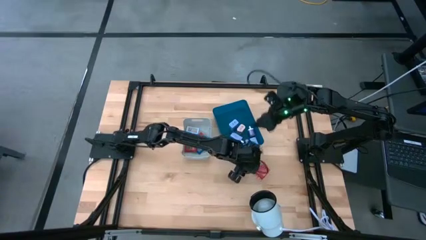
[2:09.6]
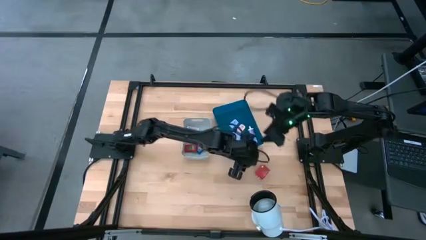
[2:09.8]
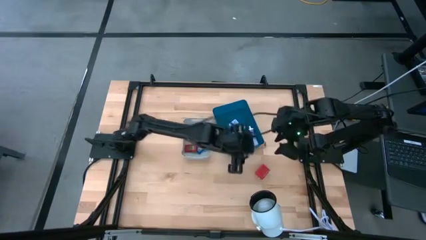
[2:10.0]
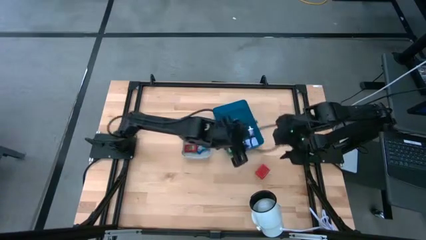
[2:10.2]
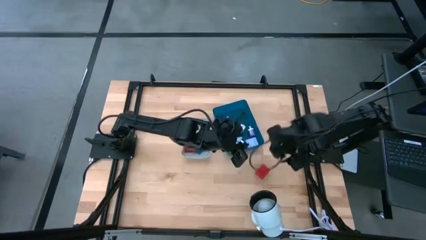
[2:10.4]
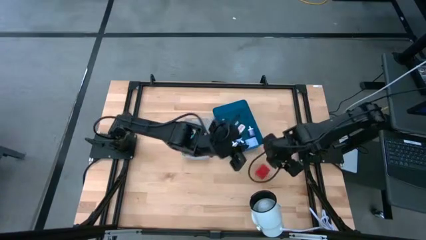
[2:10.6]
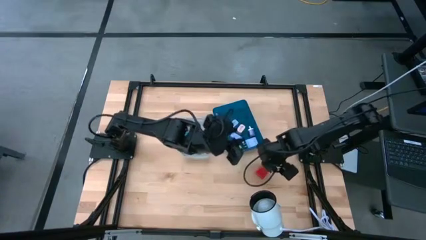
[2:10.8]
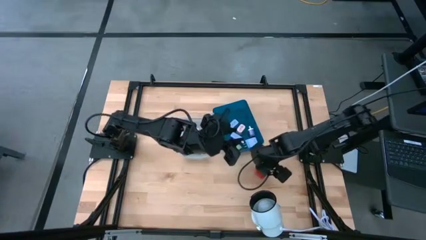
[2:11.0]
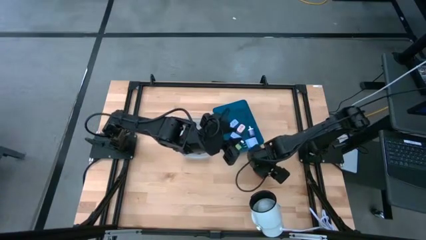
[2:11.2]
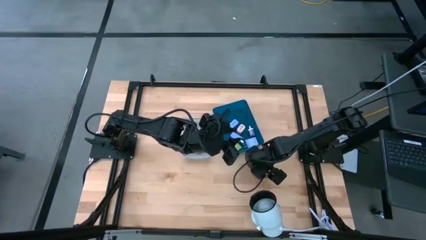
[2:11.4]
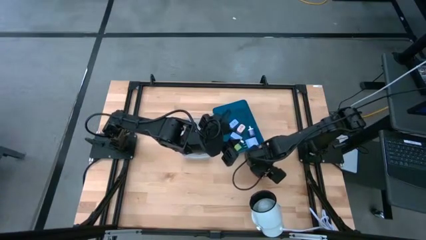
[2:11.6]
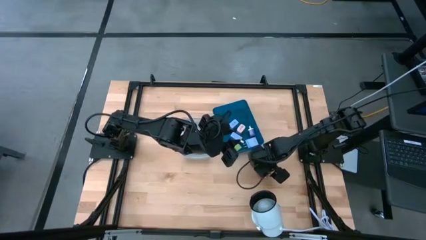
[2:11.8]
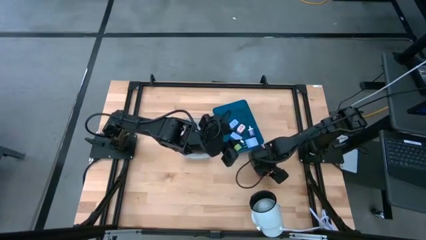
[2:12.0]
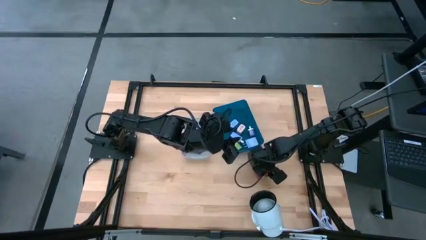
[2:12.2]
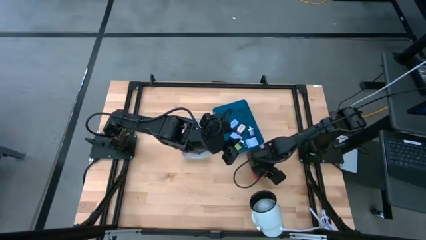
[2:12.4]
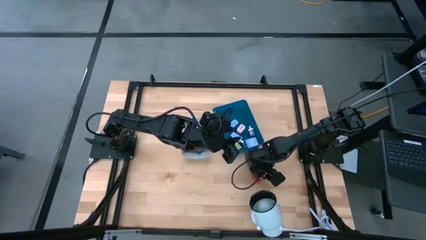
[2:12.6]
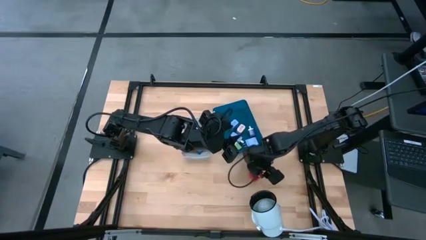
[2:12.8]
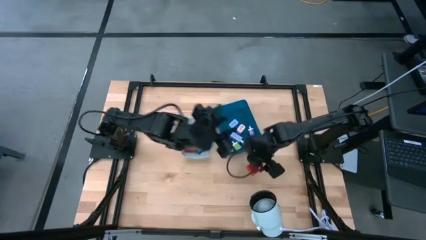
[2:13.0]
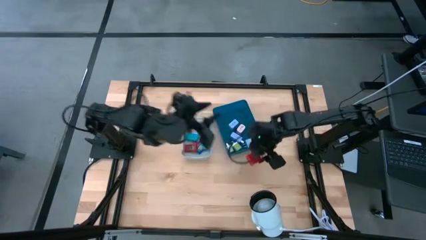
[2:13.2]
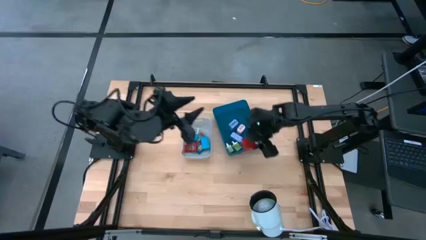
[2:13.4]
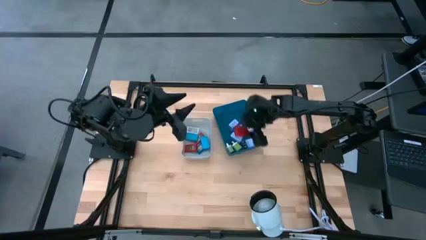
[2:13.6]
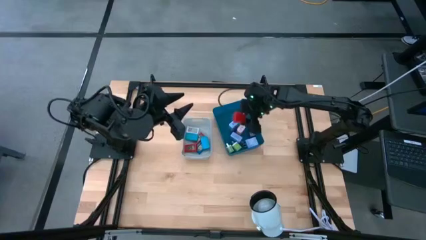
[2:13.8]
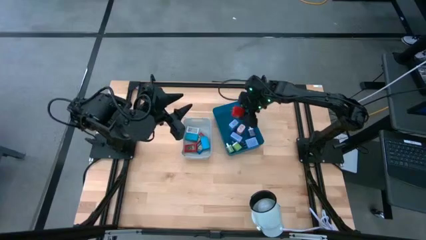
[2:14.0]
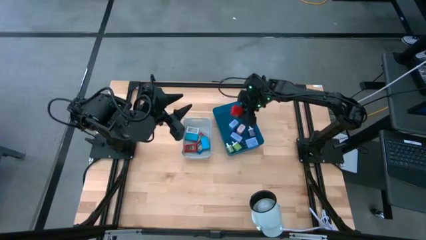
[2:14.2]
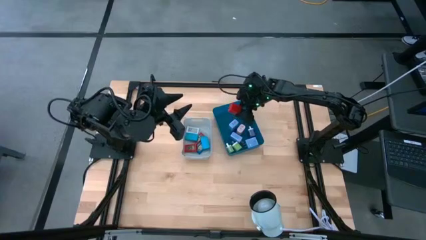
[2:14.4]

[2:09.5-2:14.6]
Task: Pick & Place Office items
Put the red charger adapter into the blue bin

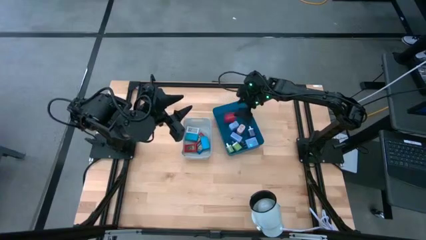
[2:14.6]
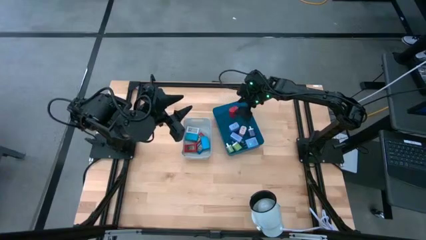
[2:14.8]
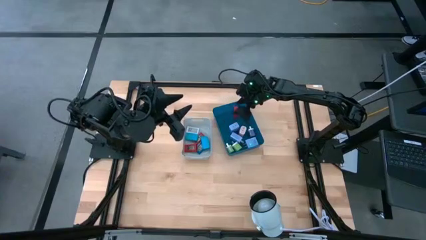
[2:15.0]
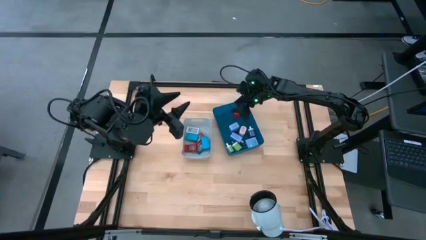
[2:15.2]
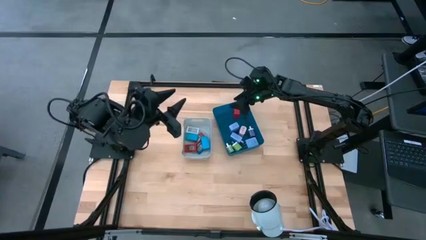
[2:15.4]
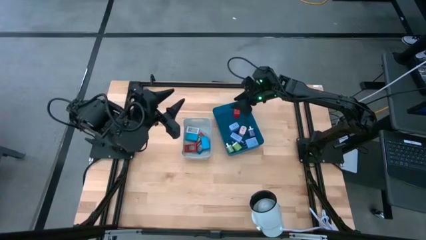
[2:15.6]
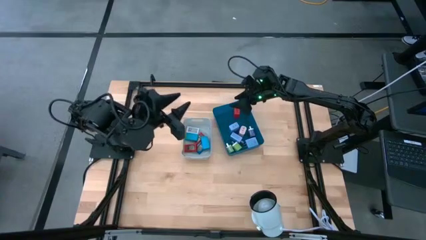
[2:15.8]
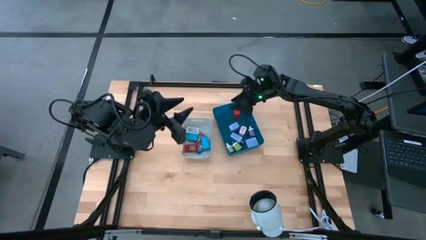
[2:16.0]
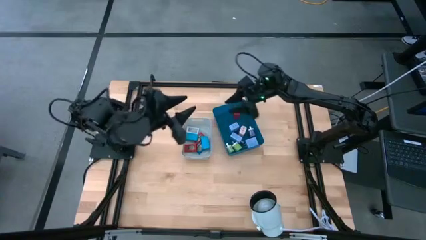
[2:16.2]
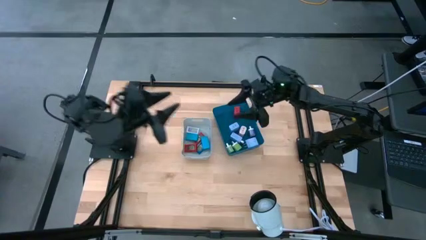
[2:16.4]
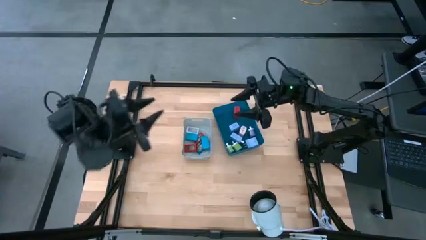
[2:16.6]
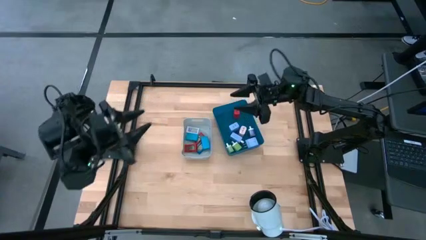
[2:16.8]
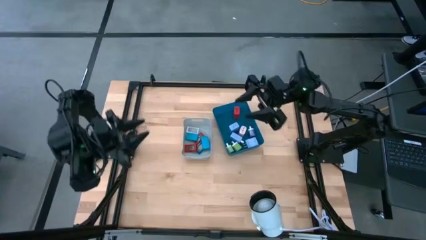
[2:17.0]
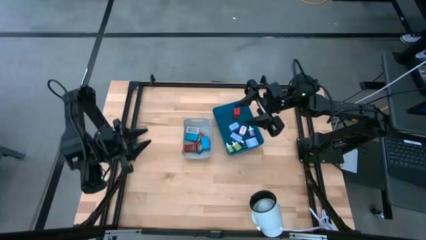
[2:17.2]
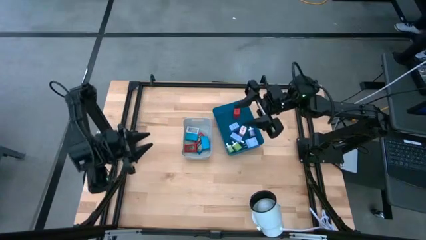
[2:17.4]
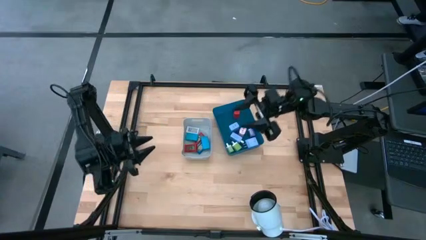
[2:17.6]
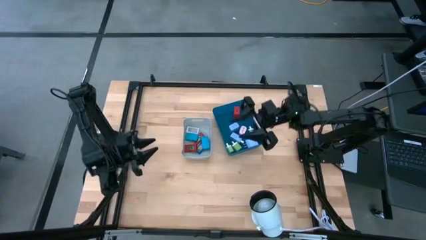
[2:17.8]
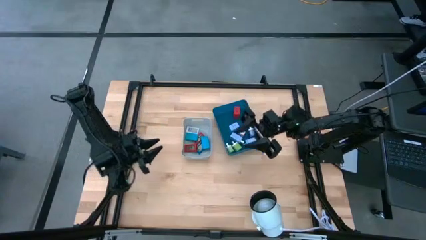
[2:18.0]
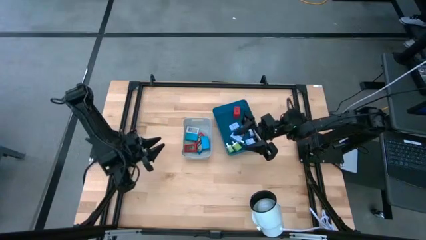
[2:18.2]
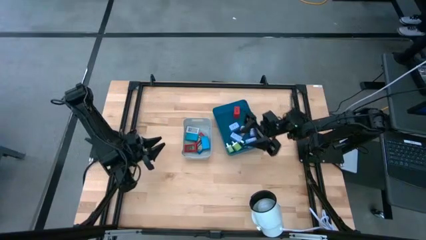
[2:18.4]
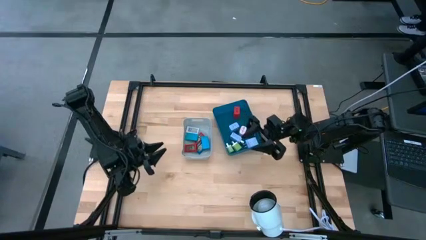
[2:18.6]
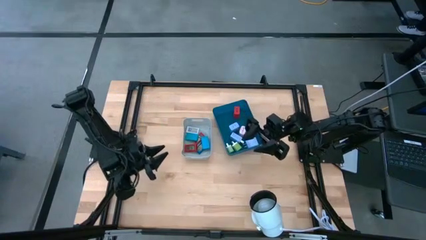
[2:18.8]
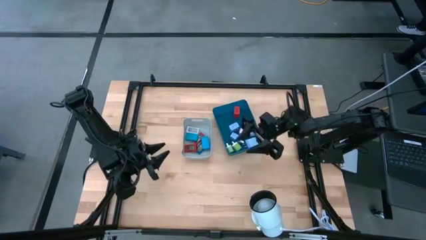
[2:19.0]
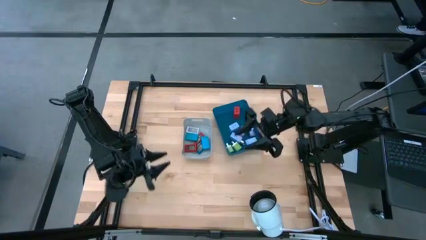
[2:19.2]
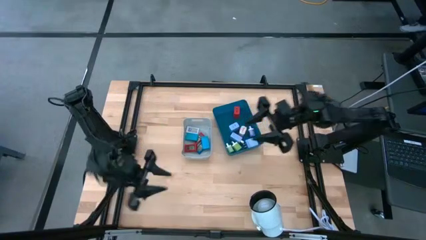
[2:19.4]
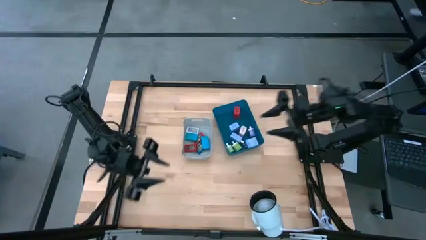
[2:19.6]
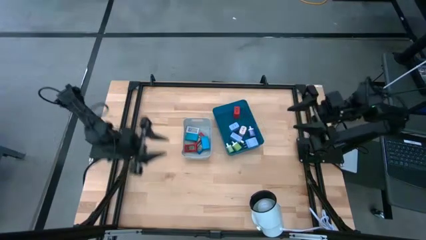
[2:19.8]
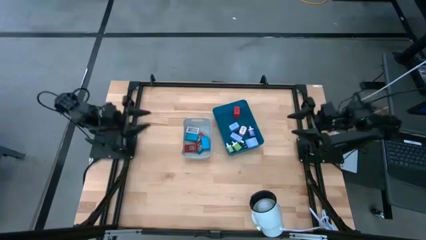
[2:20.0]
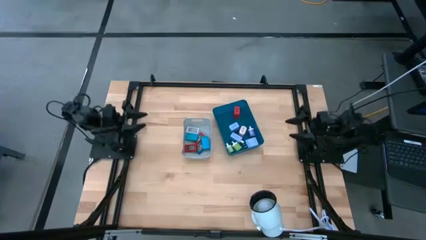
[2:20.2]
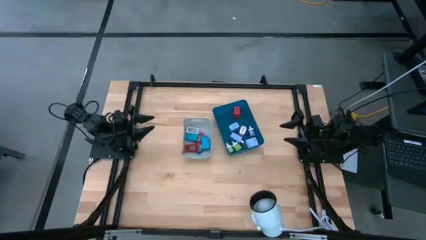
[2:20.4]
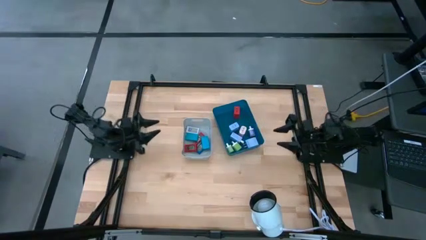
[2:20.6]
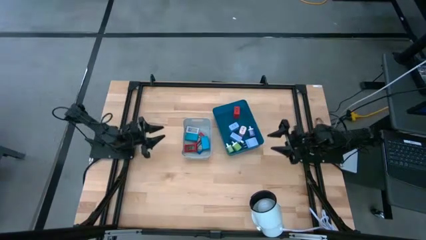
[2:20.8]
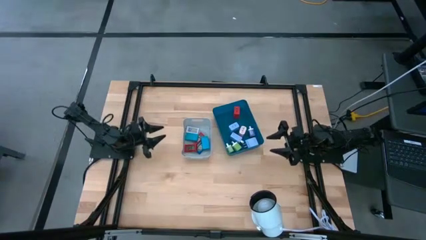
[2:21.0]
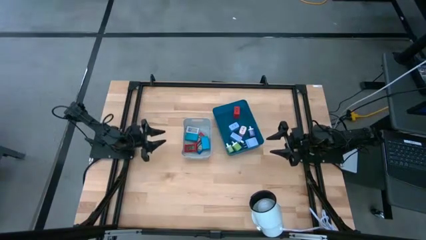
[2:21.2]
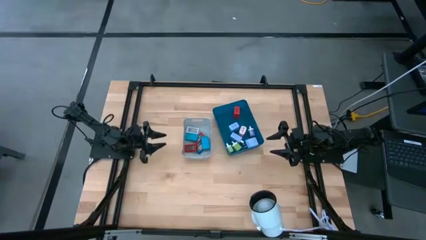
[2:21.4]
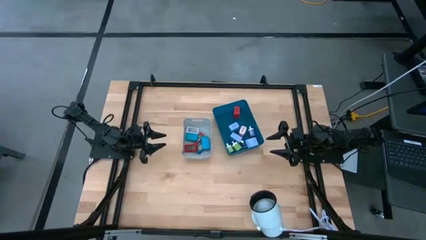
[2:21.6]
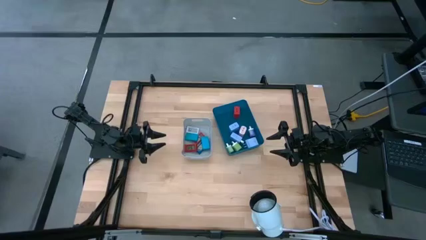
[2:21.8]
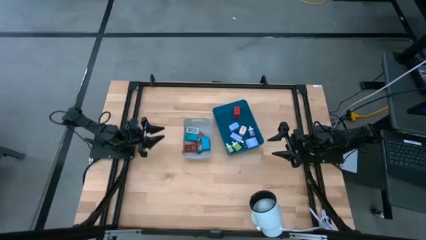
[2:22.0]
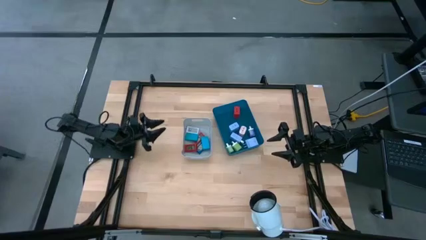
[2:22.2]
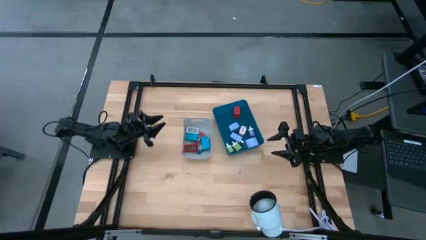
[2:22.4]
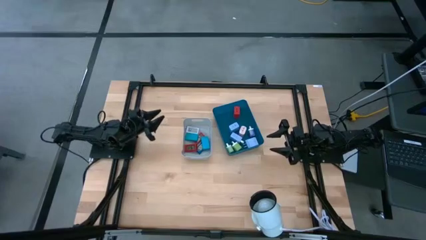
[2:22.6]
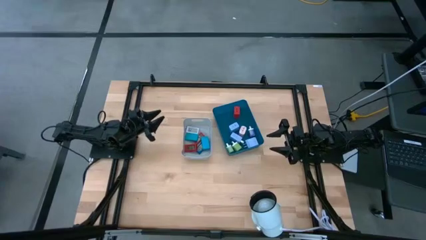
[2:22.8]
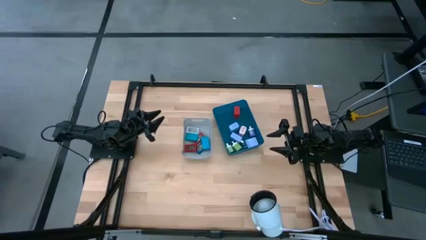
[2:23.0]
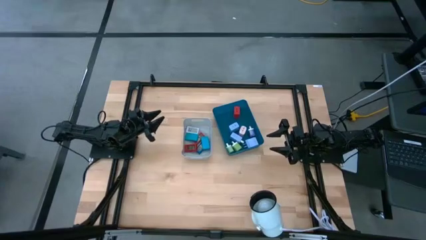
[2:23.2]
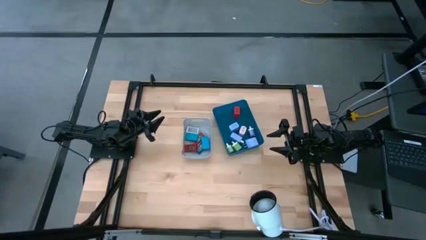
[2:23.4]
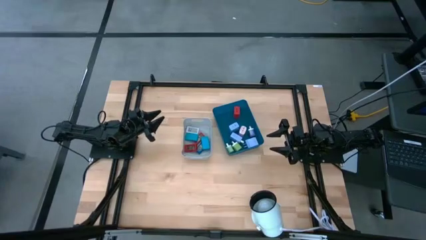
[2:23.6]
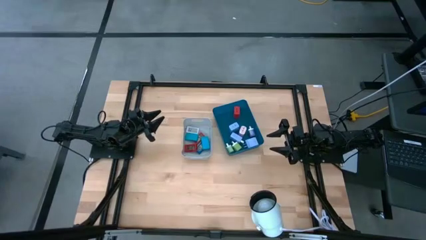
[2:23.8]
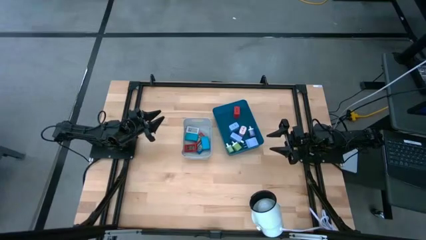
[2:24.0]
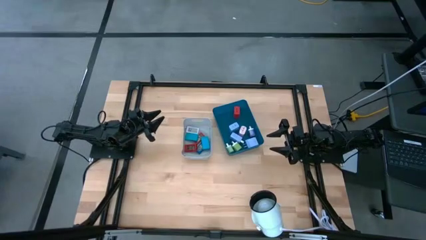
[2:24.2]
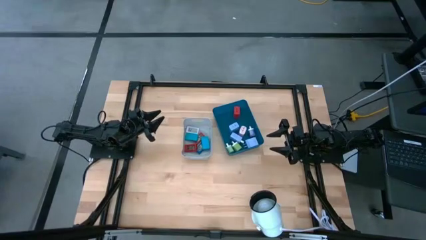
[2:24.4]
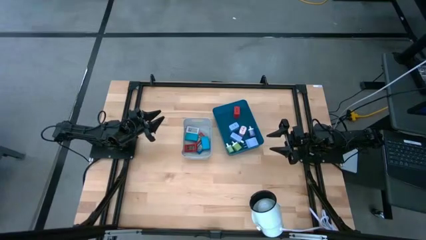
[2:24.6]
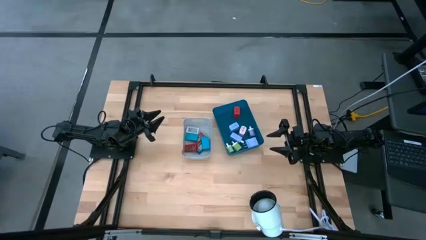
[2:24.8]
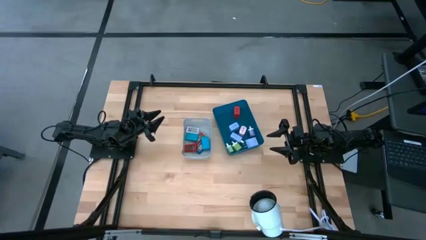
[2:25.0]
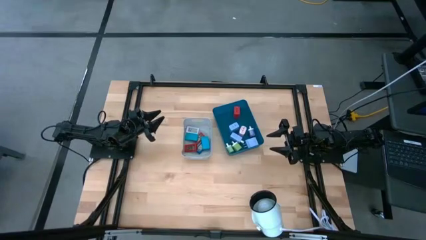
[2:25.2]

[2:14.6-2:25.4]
Return to Home Position

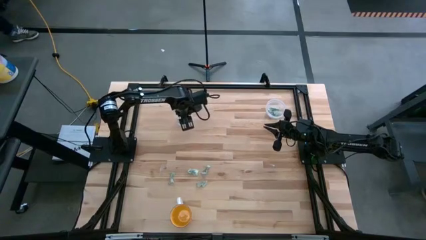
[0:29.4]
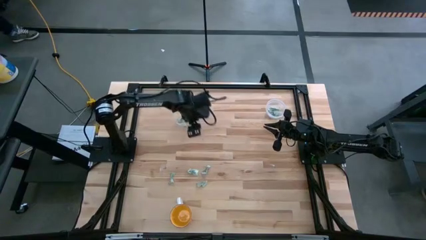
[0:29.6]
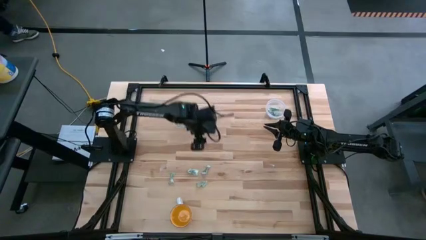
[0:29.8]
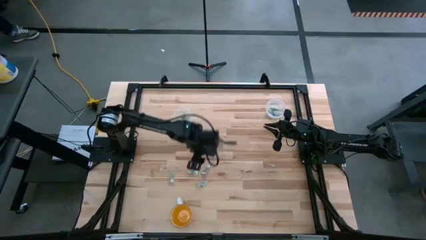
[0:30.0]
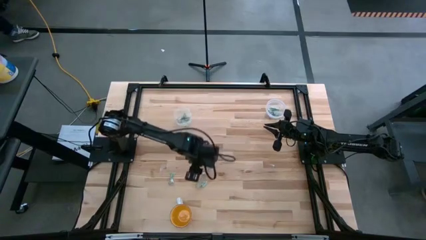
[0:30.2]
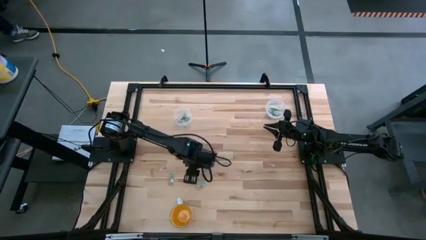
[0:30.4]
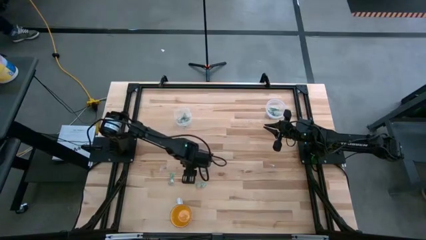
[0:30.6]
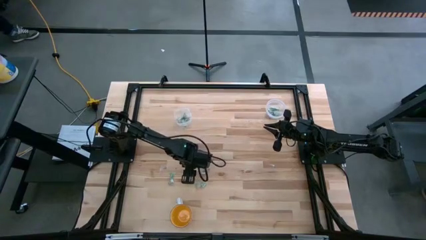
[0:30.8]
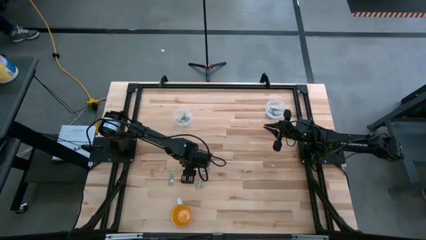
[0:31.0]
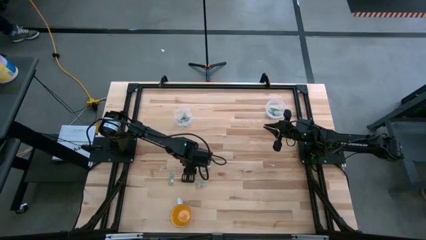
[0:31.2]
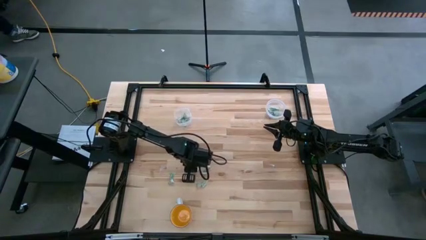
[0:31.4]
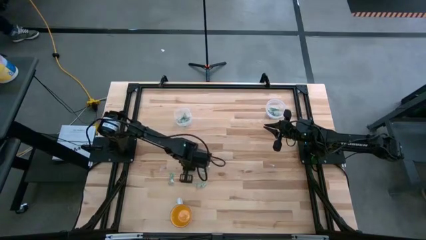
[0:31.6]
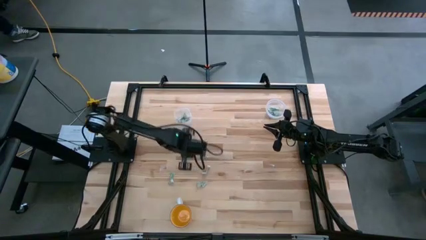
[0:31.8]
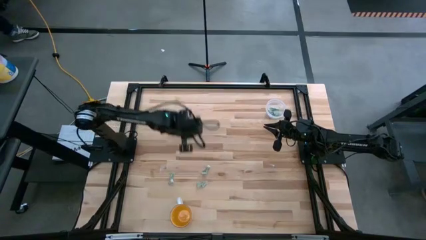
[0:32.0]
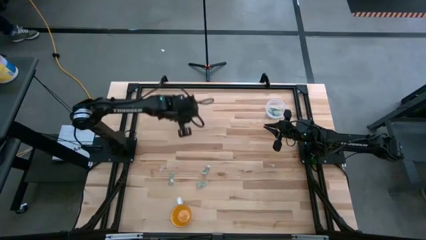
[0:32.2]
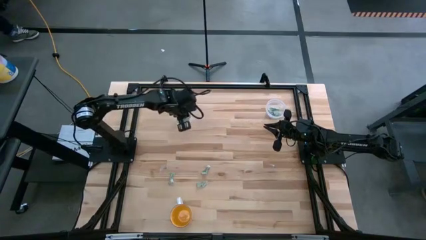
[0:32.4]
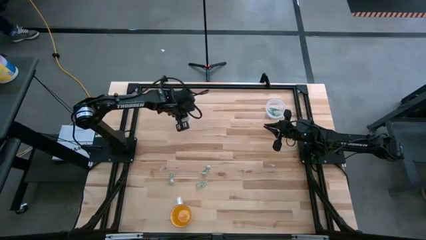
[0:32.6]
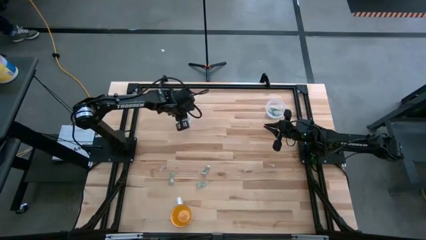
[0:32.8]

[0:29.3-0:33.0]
Task: Pick and place items into bin
Put the stevia packet into the left transparent bin
